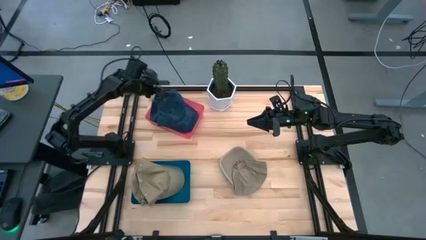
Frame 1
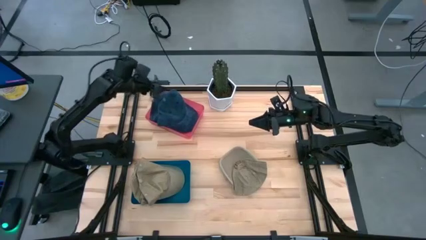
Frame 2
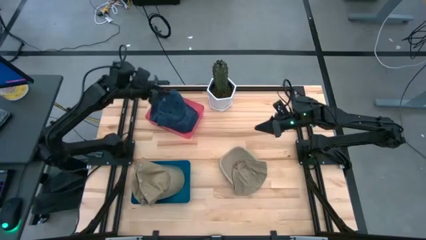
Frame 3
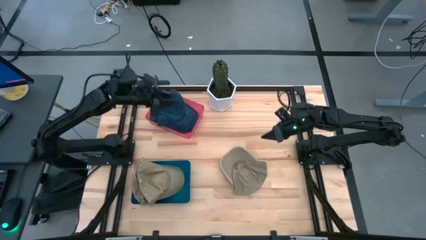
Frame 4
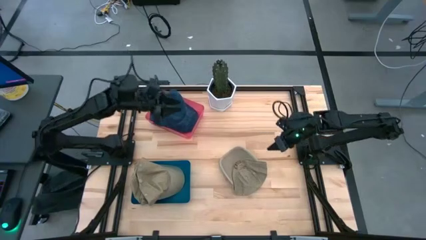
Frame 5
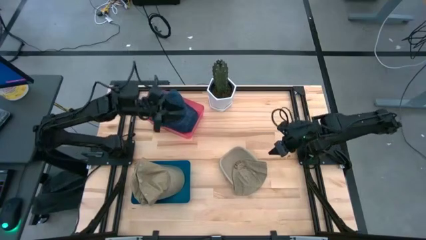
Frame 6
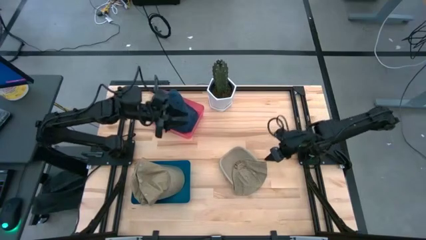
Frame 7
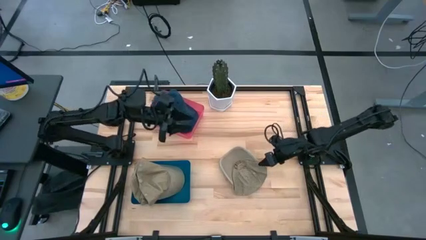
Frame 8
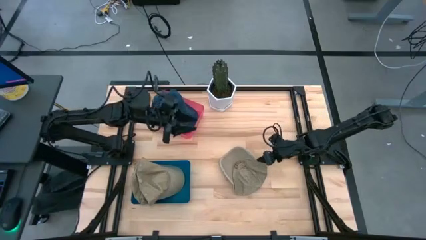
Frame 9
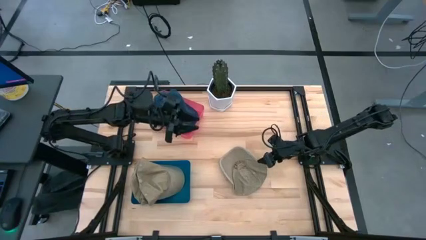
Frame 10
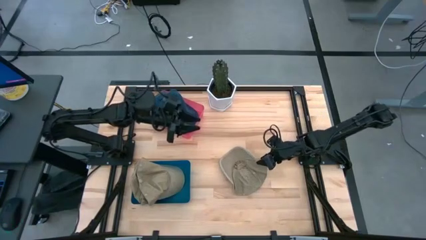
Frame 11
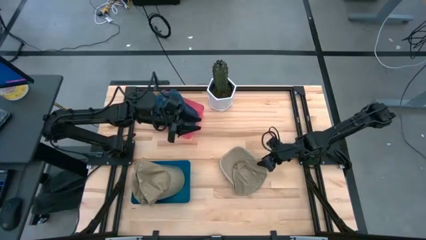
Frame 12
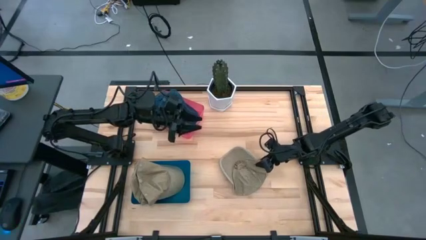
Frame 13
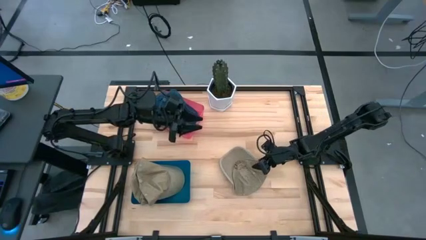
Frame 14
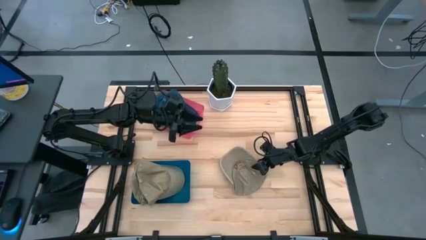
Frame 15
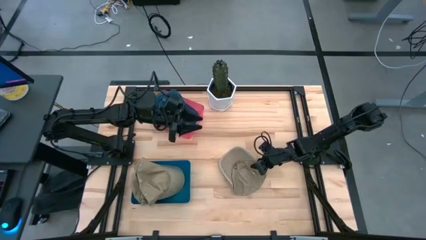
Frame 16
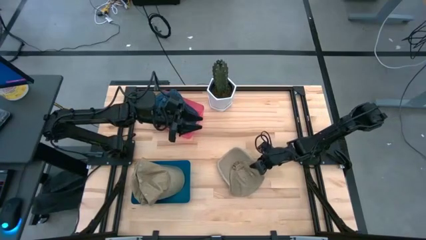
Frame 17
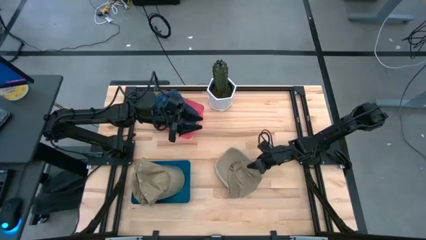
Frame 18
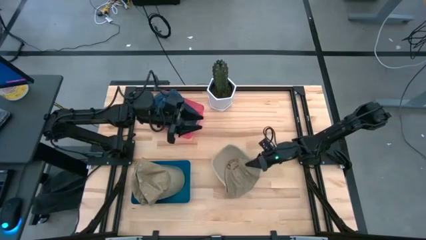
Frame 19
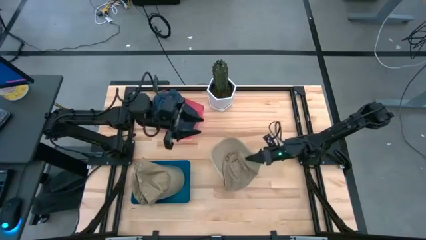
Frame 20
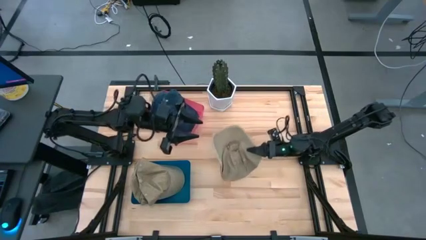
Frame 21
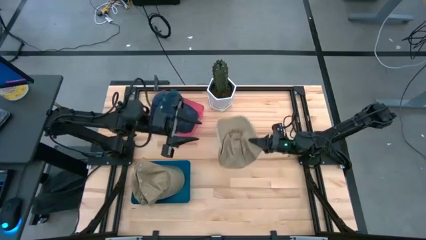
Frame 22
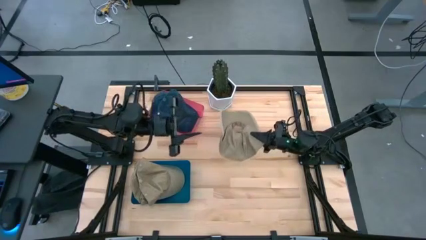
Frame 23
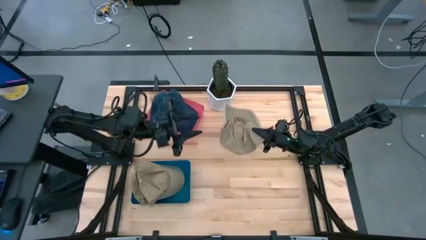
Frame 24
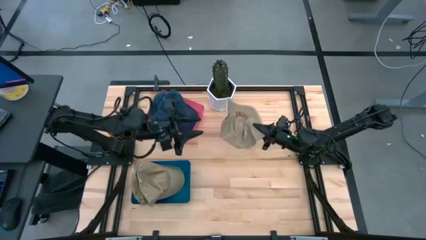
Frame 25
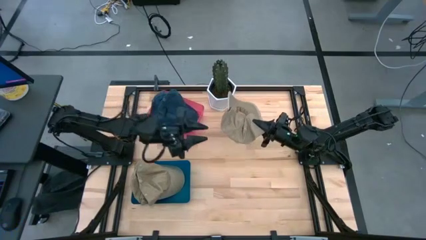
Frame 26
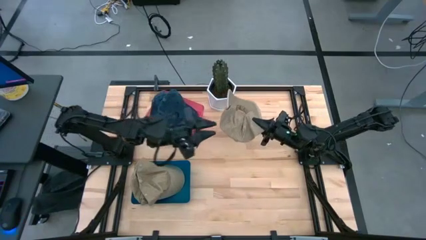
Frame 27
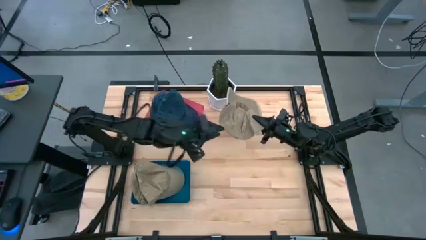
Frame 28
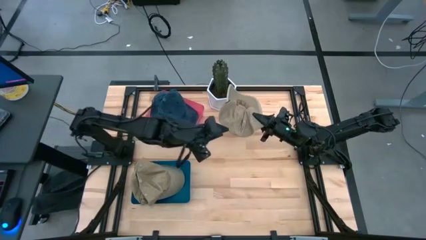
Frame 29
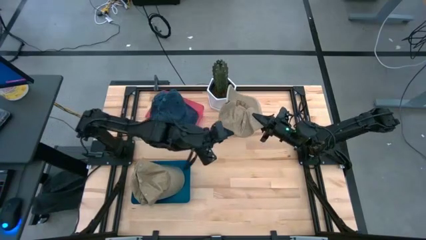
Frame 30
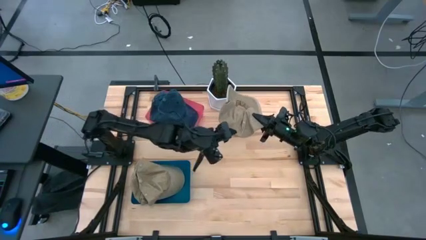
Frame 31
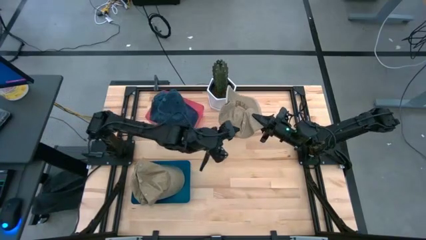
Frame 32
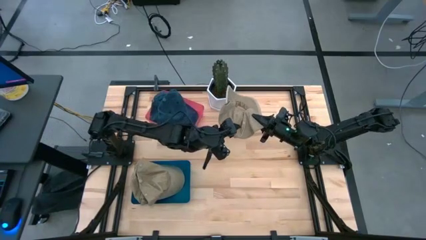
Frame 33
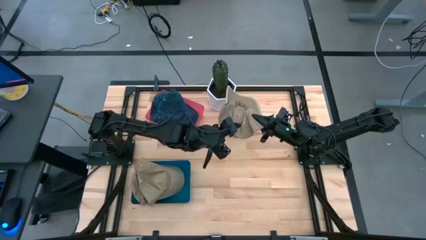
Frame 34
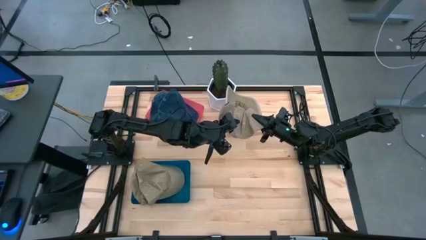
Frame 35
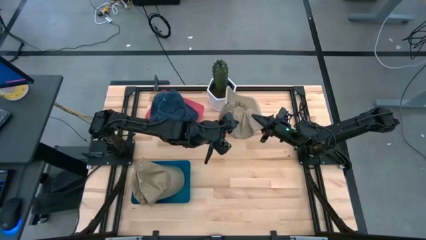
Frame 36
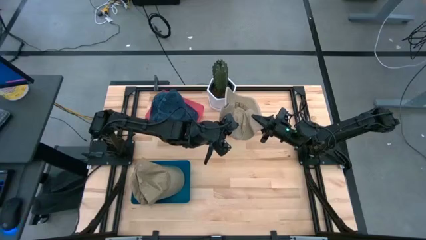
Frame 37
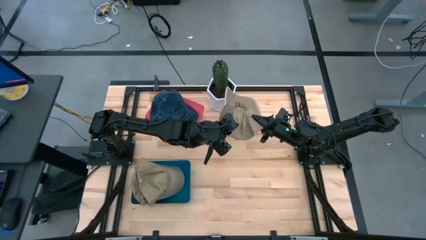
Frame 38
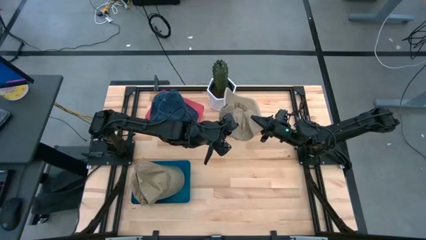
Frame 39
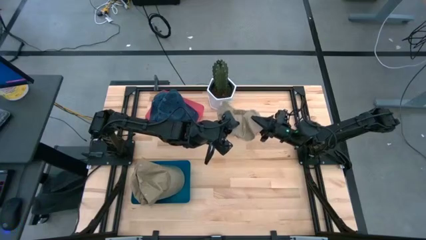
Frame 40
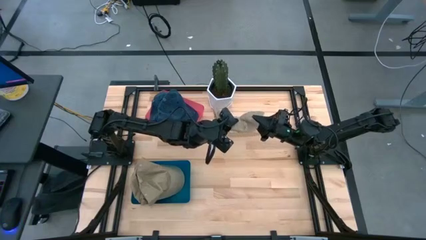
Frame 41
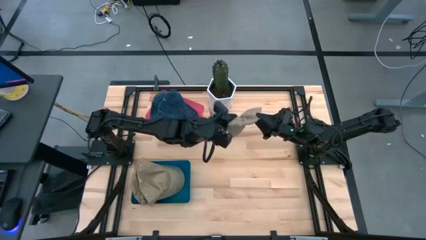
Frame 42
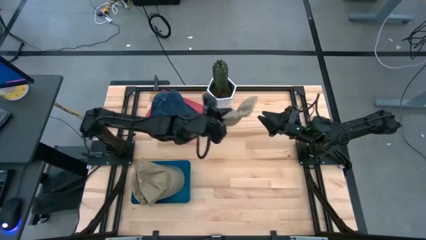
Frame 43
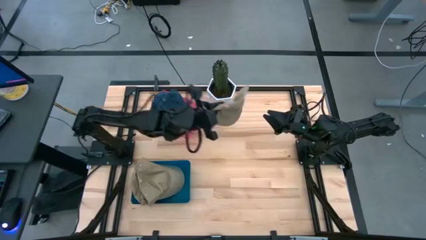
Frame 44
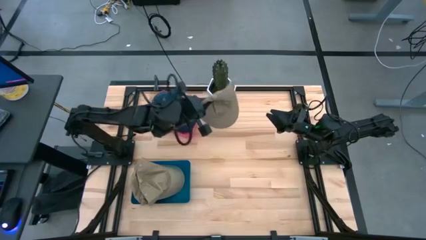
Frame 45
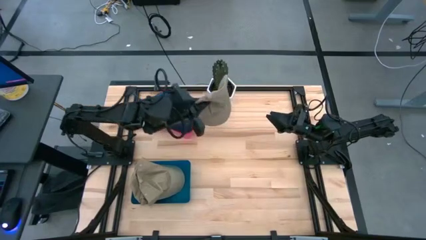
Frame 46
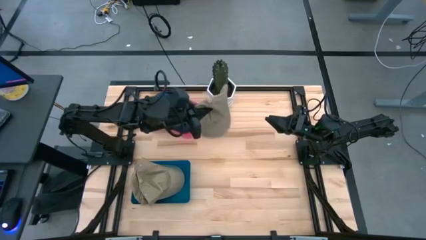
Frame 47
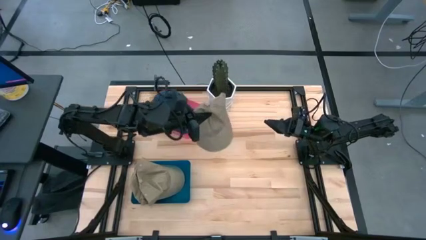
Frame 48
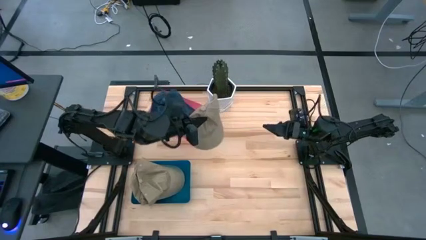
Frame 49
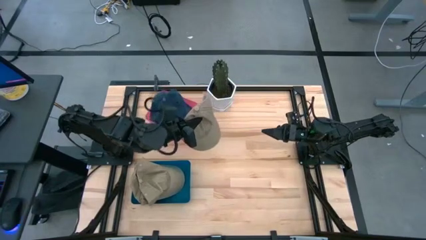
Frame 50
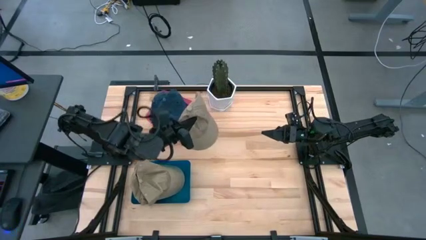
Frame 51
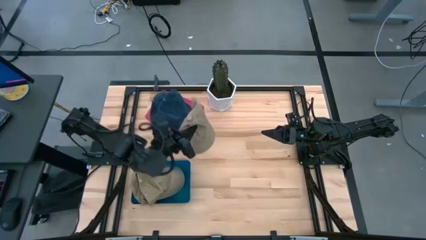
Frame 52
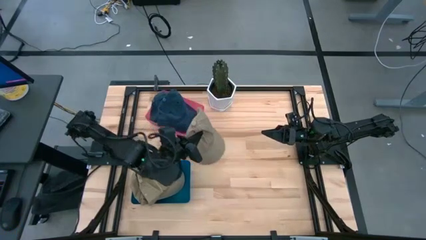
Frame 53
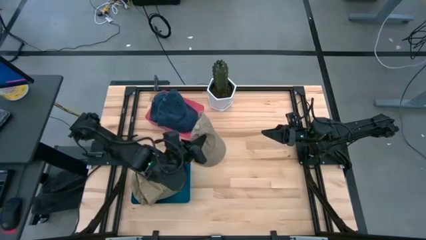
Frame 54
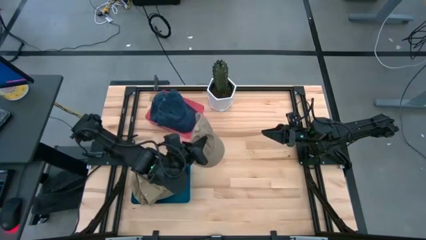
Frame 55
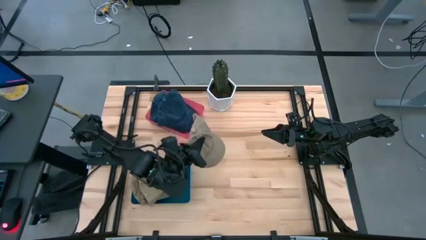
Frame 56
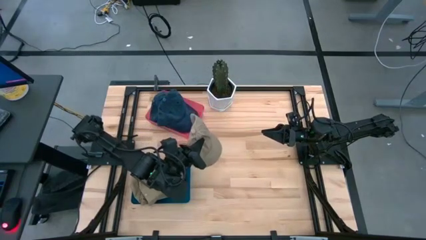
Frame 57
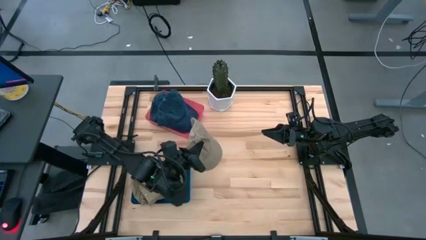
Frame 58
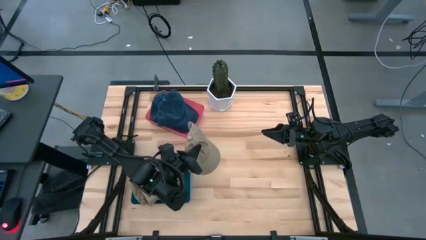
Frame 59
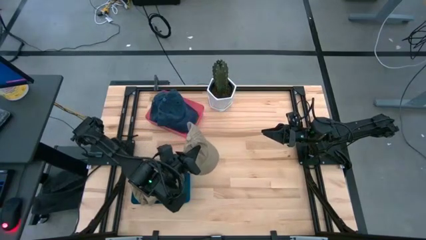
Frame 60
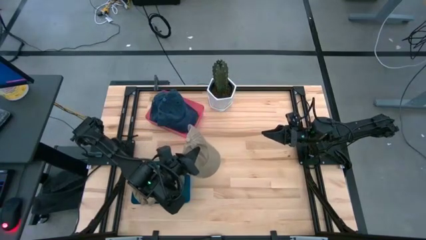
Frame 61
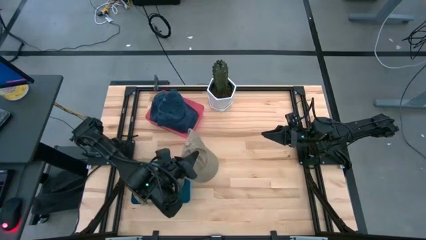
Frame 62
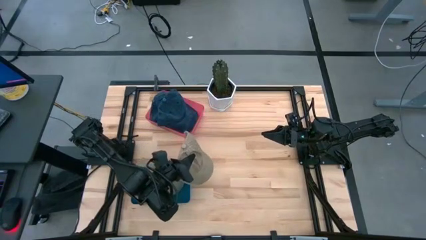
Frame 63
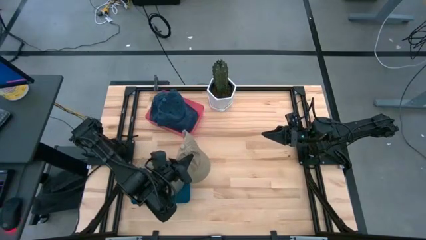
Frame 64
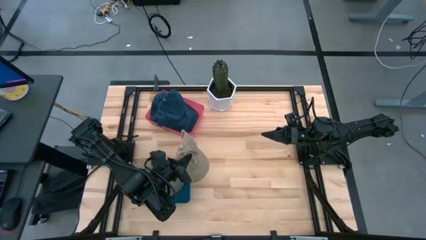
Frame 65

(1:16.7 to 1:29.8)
Task: Pick & Place hat
Put the brown cap into the blue bin

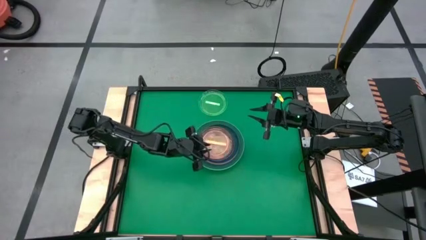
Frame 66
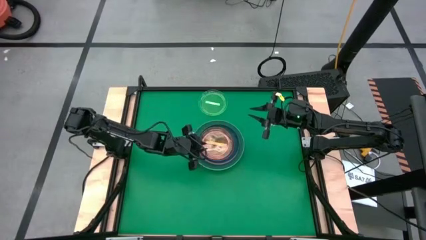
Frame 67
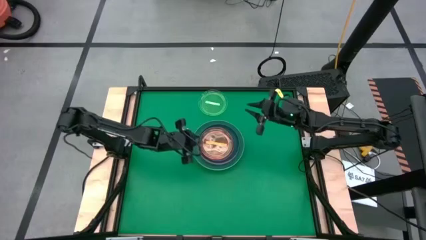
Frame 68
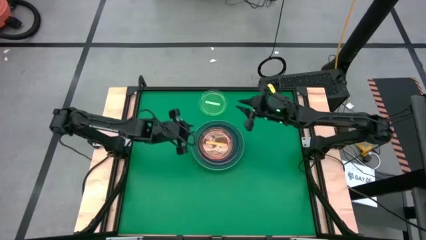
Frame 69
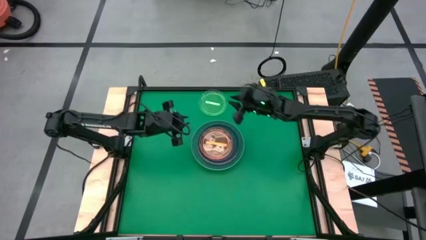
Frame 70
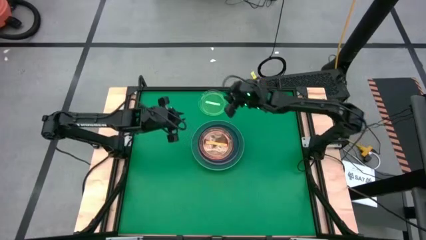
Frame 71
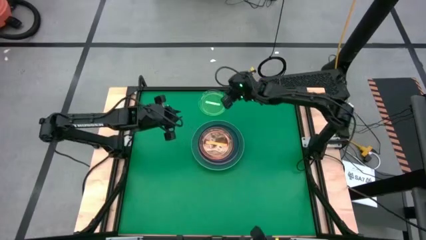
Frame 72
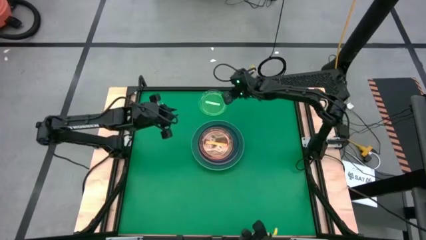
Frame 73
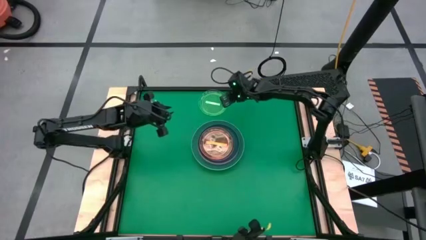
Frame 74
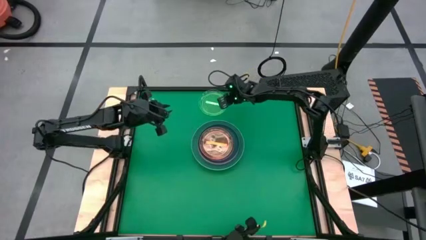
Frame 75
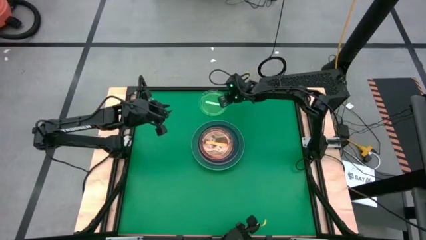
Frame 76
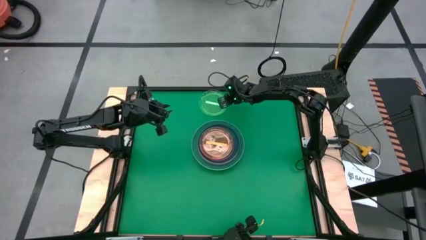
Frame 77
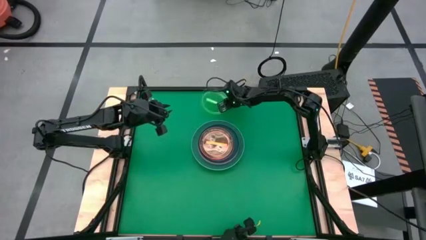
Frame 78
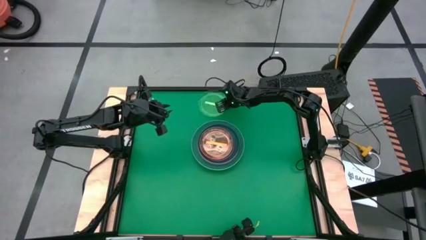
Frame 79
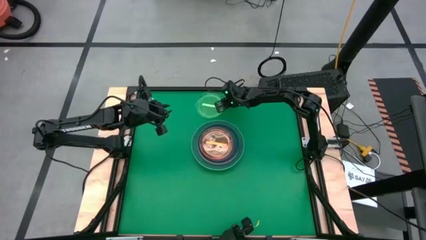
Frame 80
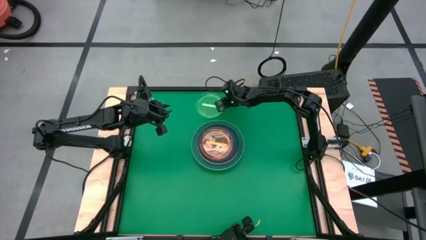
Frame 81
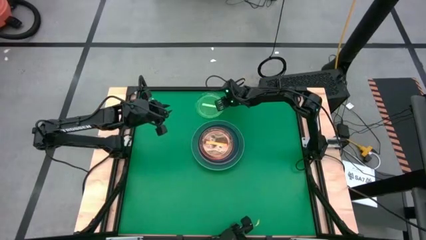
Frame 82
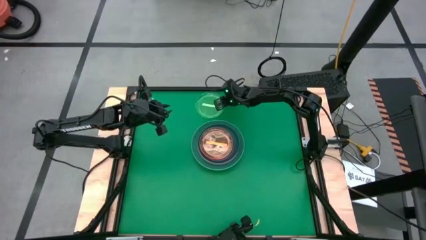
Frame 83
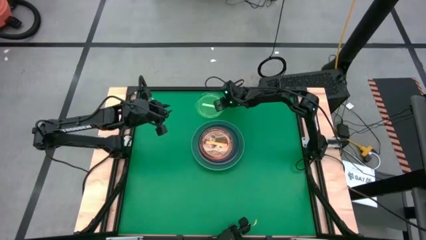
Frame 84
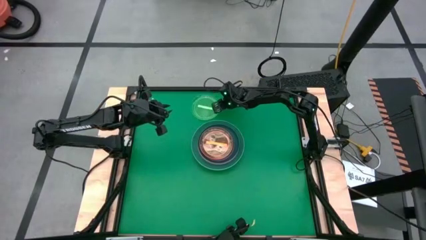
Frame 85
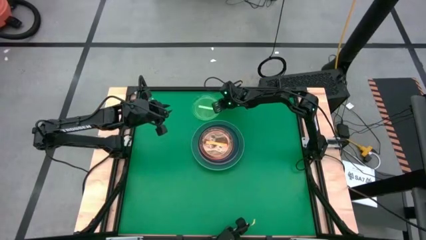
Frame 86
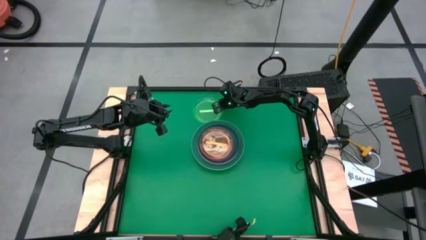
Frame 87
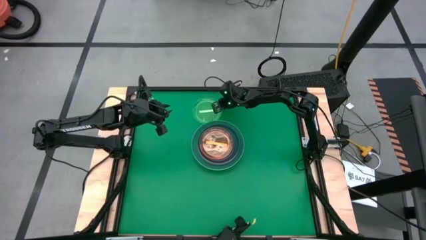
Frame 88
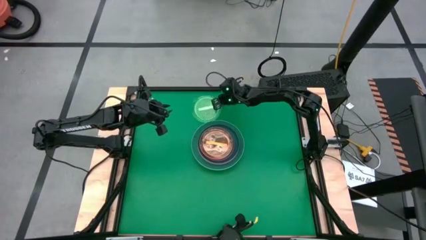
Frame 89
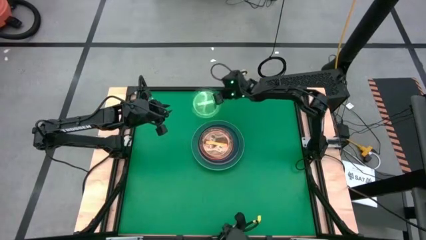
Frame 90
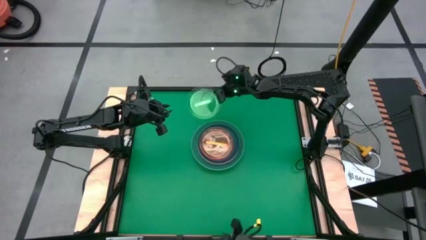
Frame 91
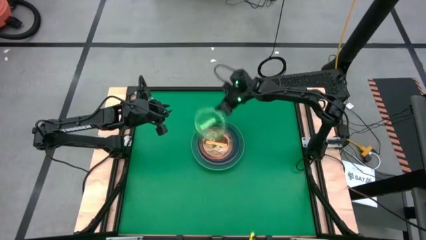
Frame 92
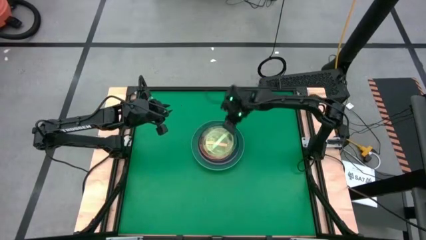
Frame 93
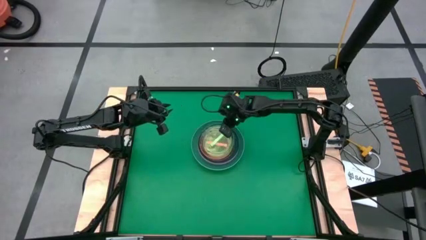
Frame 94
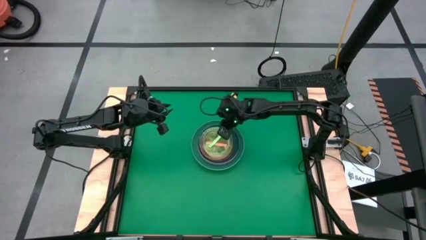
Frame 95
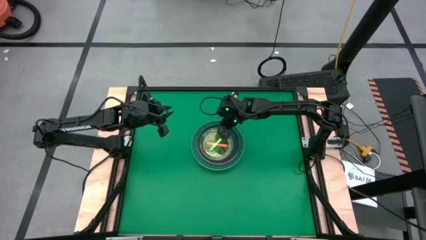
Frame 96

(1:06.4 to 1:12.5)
Task: Stack plastic plates
Stack the light green plate on top of the orange plate
